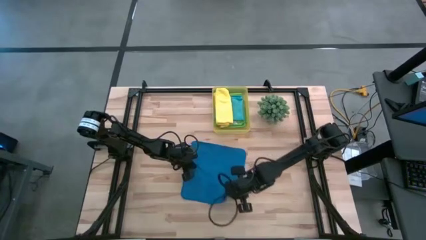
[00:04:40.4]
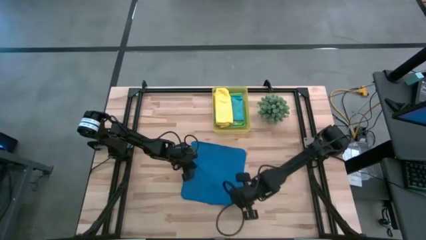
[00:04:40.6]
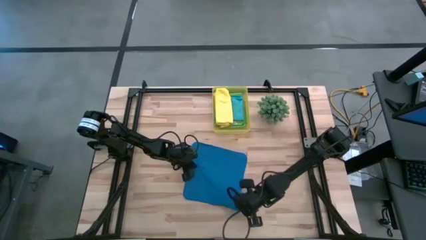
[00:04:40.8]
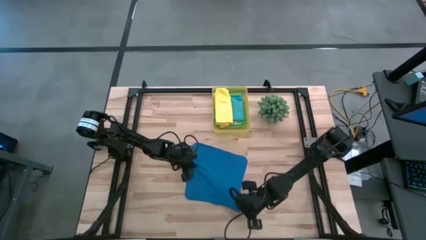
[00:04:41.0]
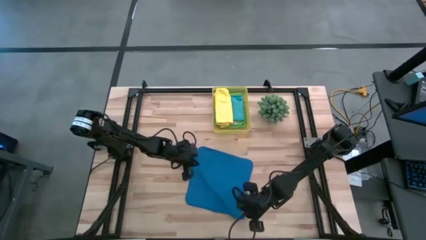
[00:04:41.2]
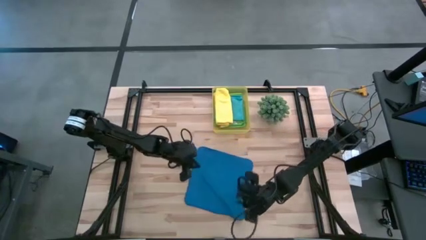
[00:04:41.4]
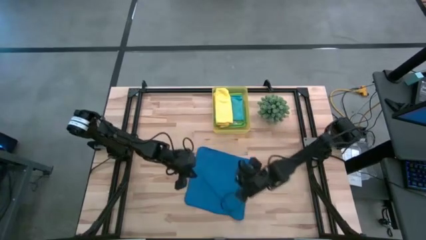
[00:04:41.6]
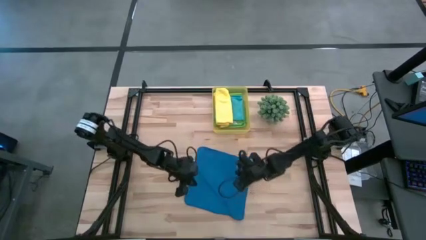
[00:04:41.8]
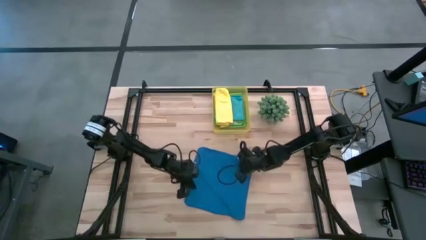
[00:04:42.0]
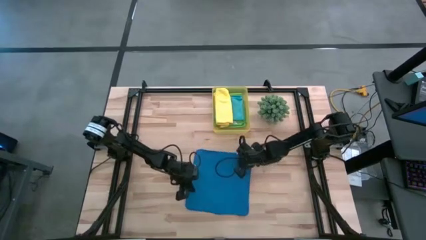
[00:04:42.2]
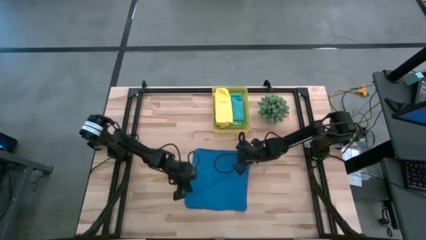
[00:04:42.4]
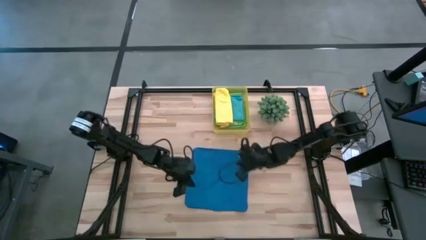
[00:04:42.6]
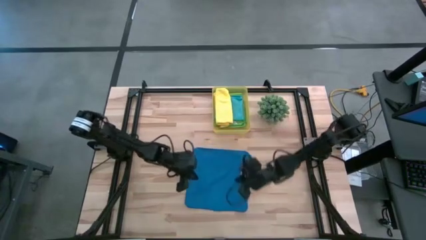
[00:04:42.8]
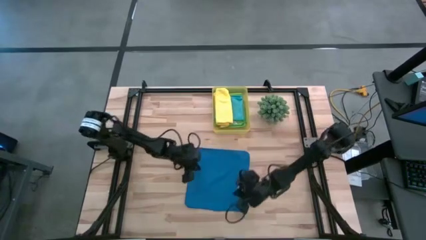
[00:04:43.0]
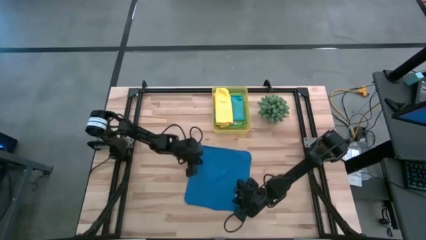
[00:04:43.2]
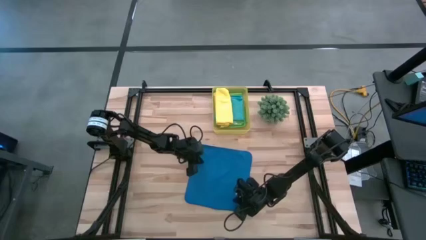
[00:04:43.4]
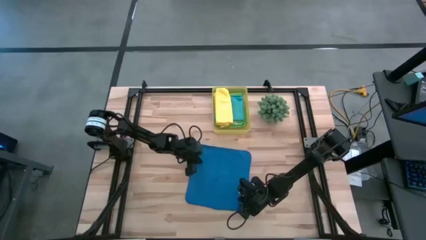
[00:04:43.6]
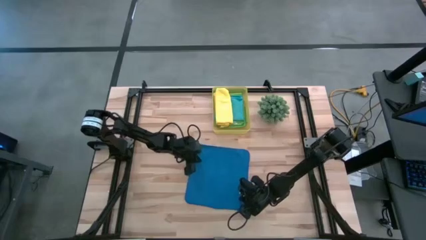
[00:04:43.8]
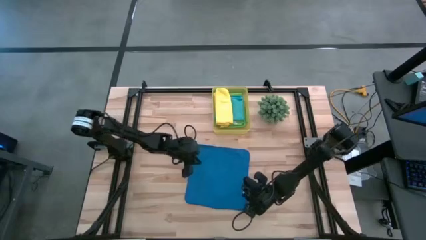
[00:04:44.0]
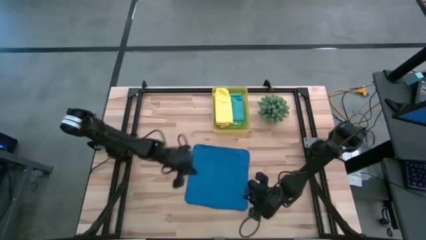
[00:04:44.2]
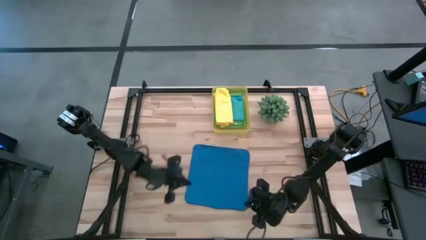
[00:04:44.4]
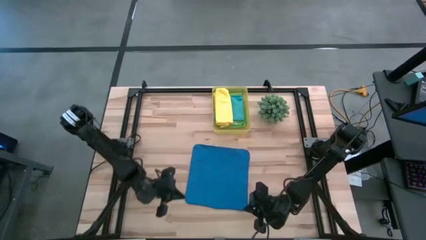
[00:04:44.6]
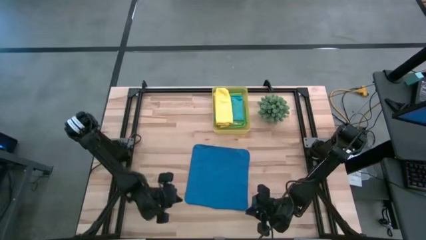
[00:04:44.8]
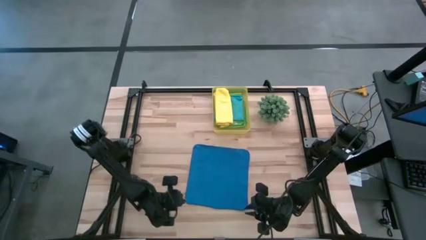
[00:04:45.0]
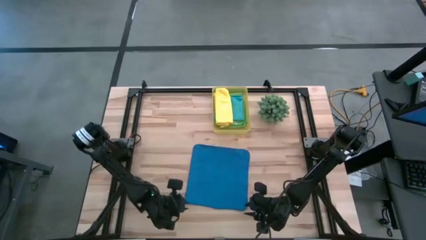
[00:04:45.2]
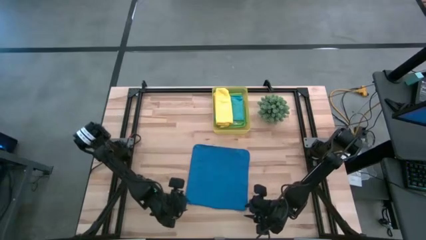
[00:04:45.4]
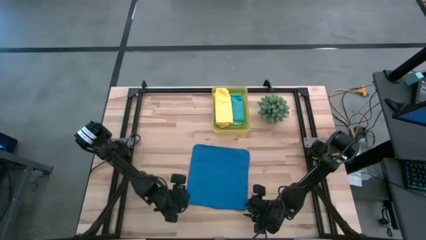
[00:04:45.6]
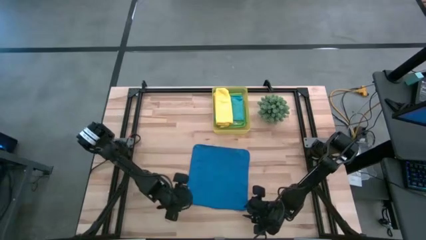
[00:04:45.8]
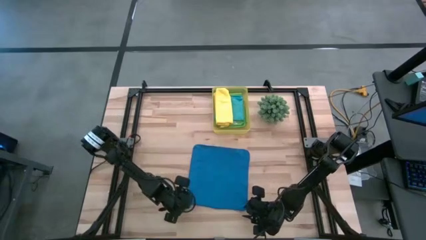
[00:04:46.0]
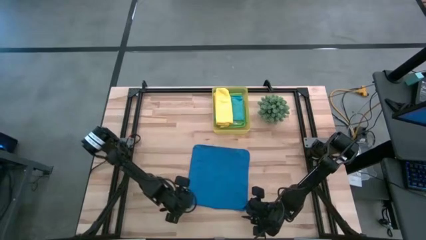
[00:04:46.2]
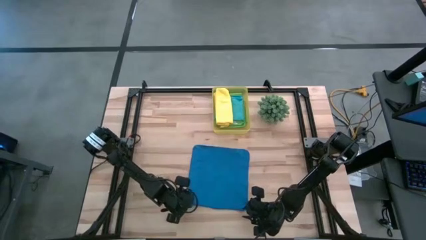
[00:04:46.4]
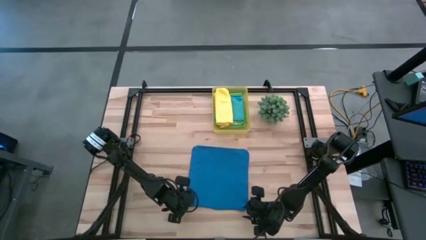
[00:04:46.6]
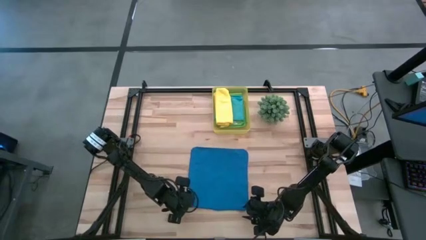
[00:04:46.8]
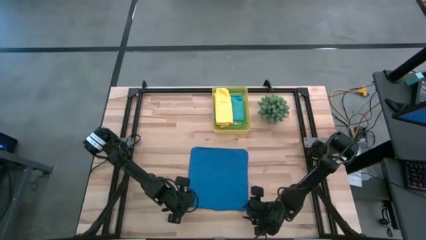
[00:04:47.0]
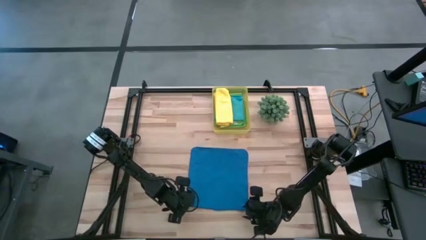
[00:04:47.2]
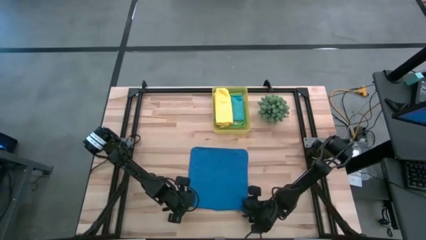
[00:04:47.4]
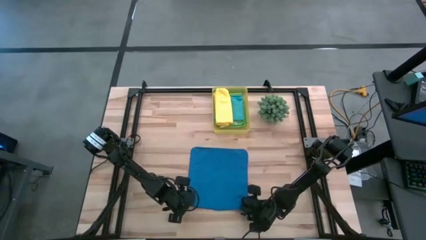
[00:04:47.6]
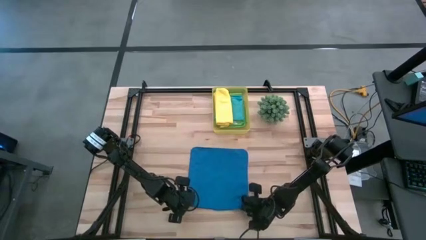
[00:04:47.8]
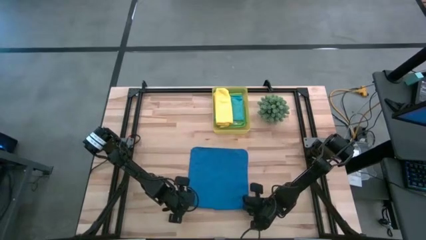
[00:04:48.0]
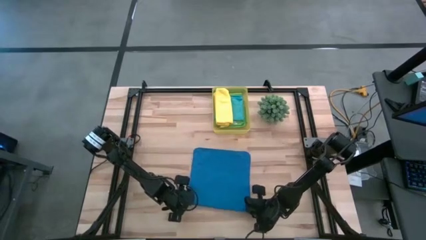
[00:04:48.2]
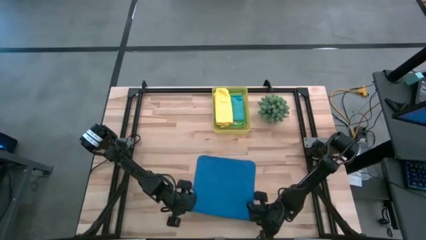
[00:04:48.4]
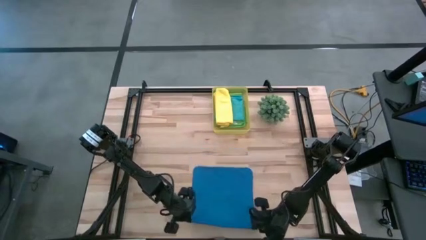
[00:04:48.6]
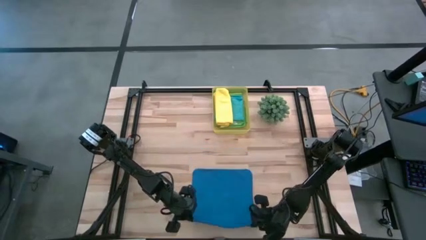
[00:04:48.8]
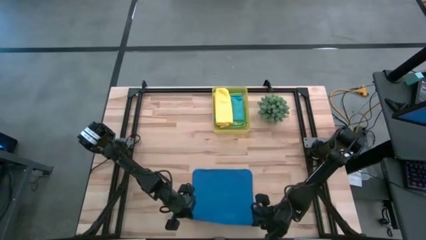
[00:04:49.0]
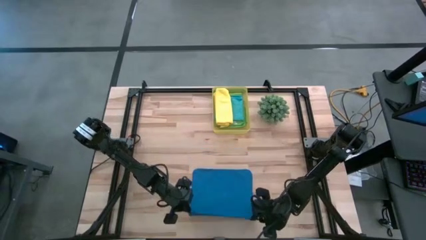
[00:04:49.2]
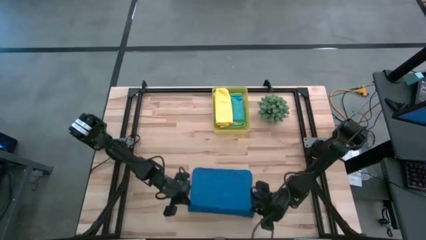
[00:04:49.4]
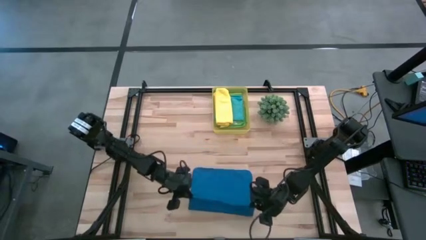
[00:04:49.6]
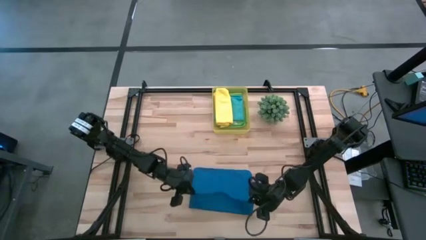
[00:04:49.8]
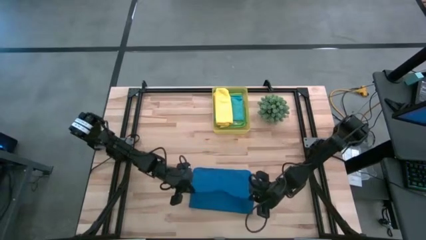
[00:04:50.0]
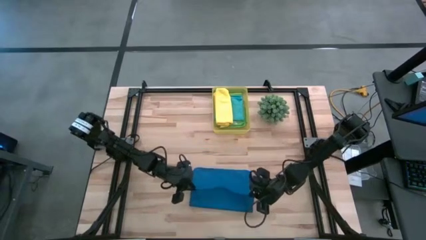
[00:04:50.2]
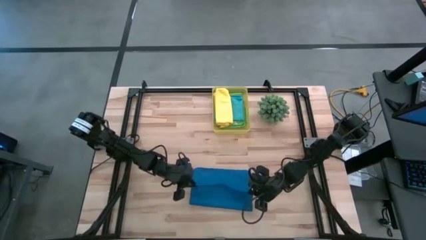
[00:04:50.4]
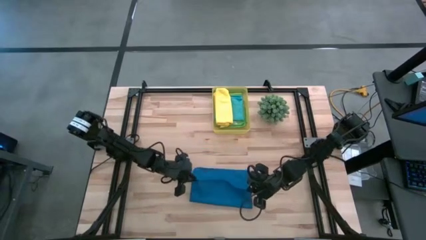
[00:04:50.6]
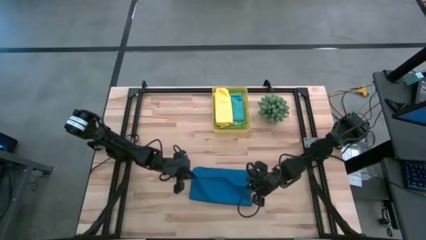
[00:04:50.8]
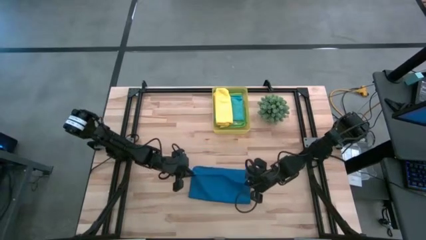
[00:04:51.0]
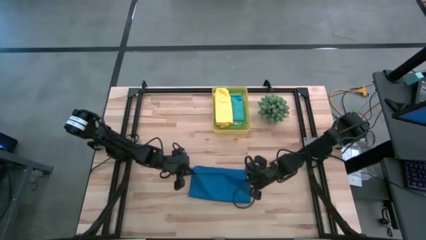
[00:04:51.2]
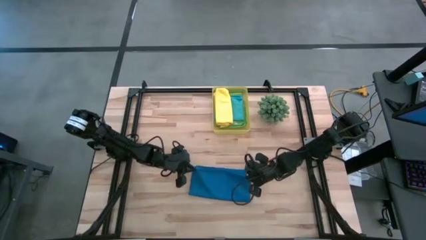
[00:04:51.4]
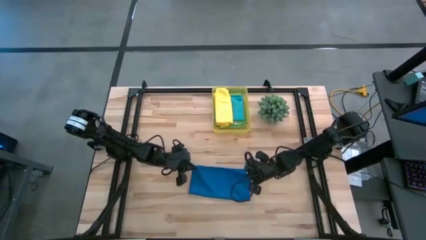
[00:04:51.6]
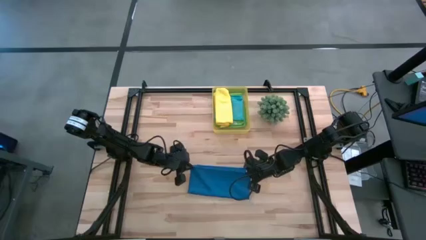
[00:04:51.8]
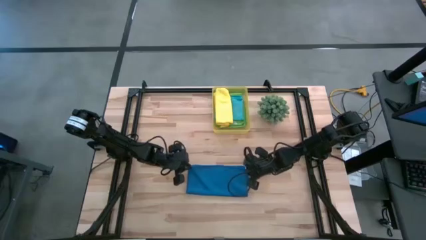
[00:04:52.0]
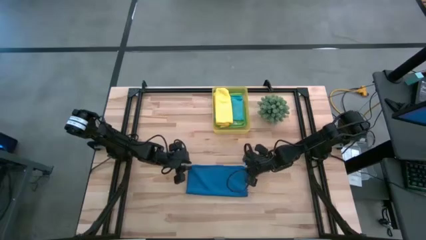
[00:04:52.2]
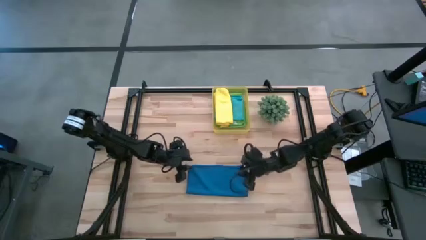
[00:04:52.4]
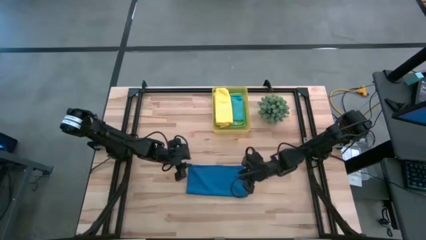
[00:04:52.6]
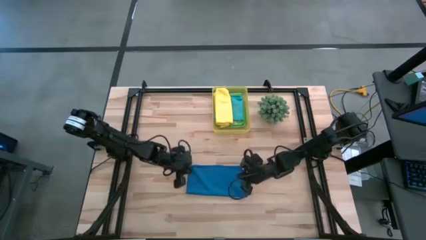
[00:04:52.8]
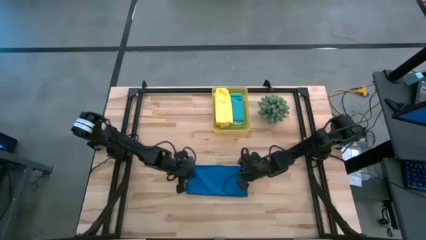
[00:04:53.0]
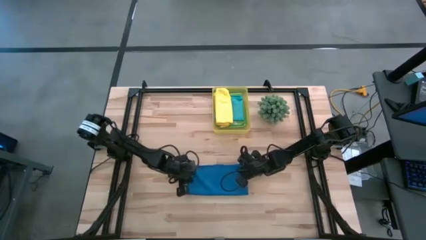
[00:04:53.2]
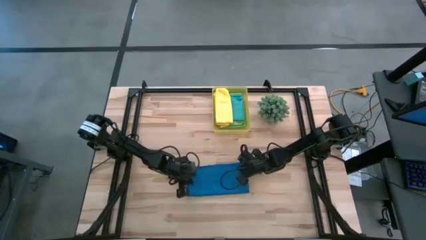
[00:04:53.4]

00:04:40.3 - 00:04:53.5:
Task: Fold microfiber towels
Fold the blue microfiber cloth

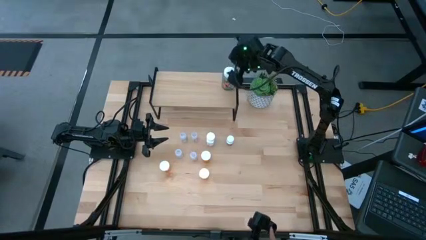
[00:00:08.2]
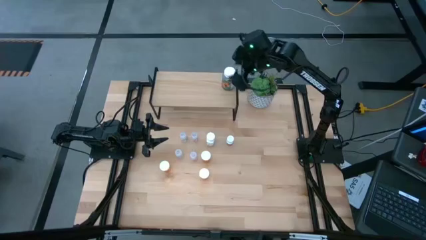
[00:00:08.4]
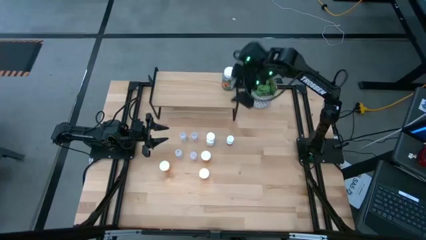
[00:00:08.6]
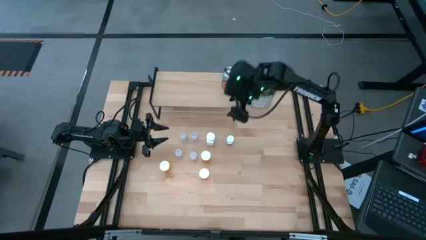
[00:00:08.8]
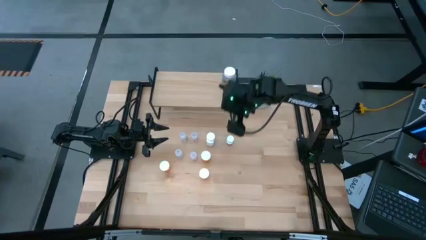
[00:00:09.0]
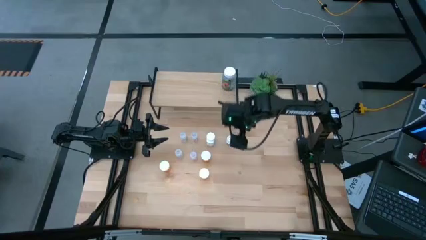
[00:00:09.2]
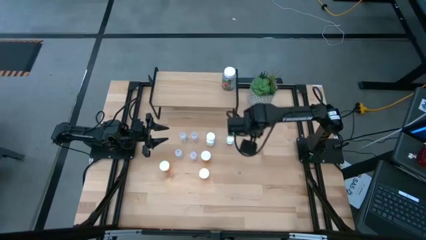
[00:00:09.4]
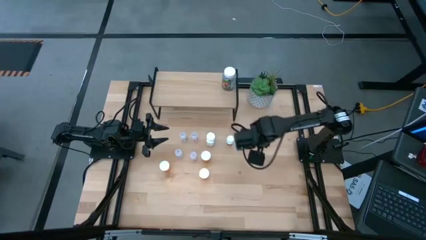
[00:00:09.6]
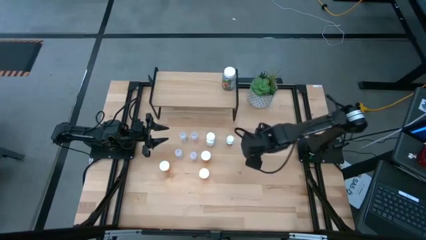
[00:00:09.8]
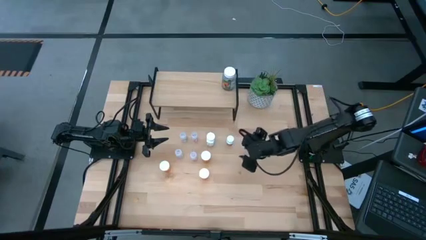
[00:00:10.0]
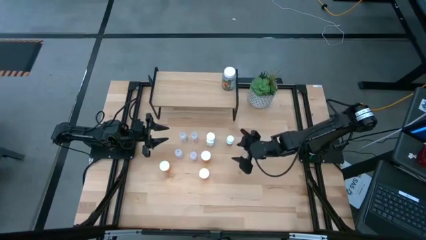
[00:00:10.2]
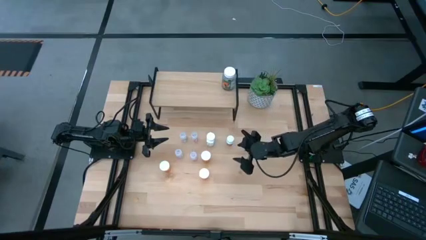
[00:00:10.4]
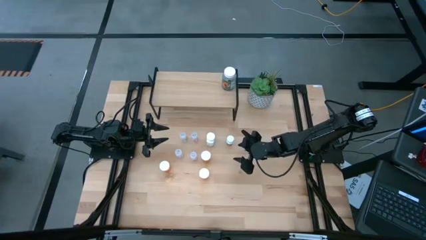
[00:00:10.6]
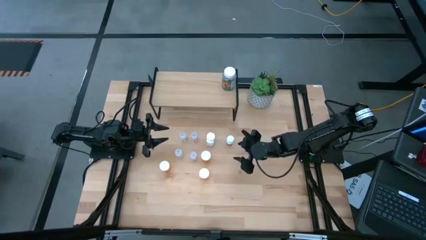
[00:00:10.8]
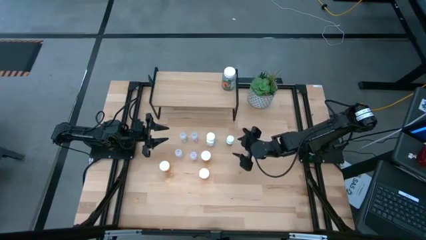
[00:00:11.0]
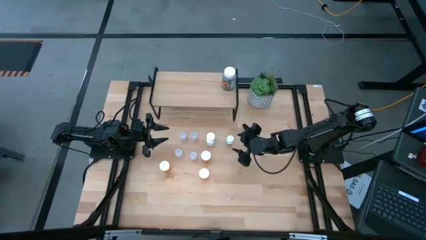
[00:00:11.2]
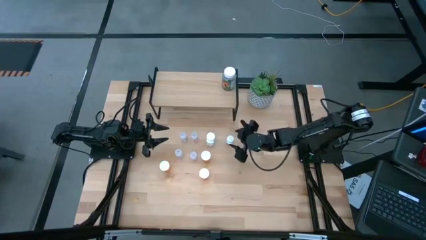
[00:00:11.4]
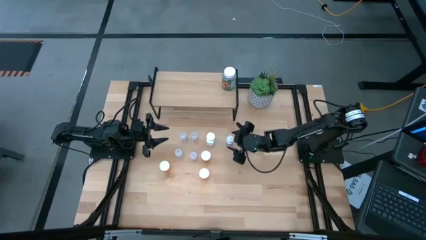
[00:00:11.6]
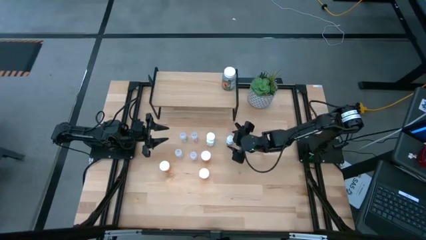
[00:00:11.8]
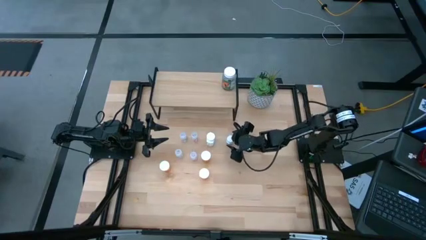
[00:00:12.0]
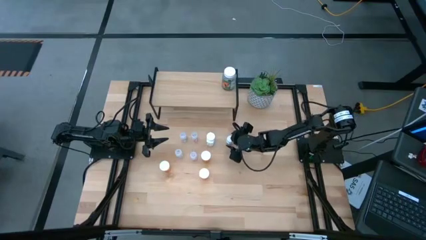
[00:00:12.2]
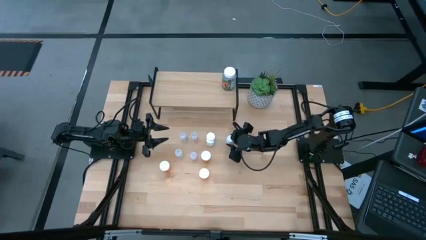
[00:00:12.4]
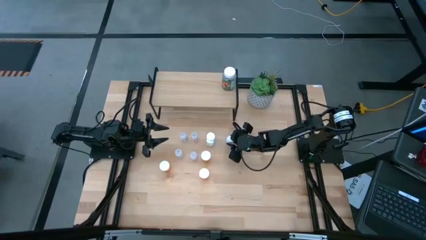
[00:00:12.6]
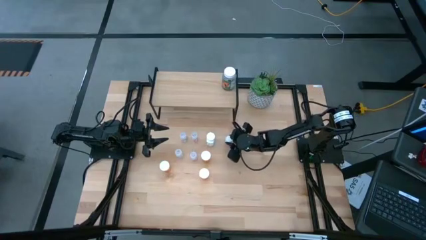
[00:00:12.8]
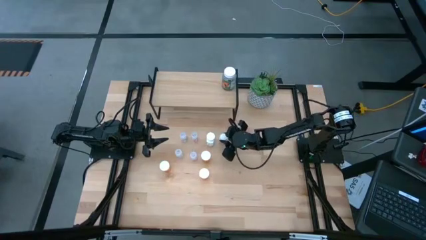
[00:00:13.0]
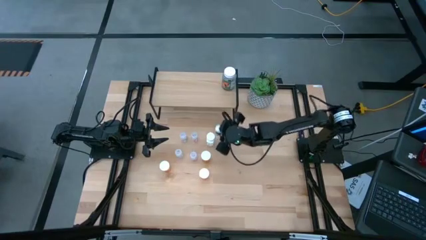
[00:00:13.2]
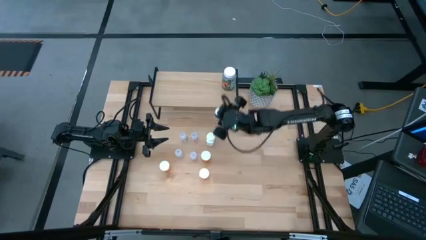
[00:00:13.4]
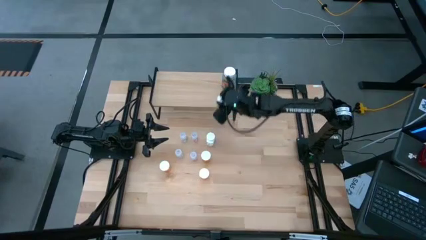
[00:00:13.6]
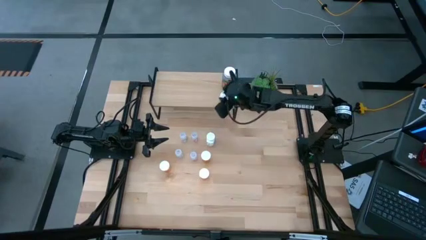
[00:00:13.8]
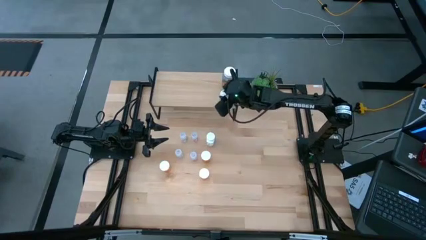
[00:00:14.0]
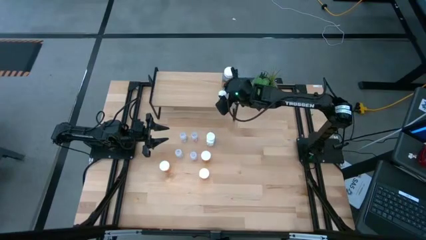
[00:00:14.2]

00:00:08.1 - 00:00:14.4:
Task: Pick and place medicine bottles onto shelf by color
Put the white pill bottle on the shelf
